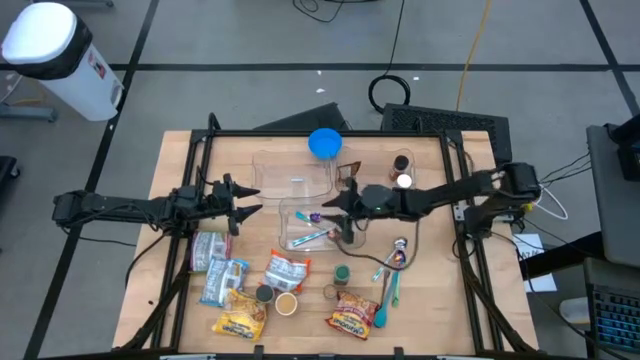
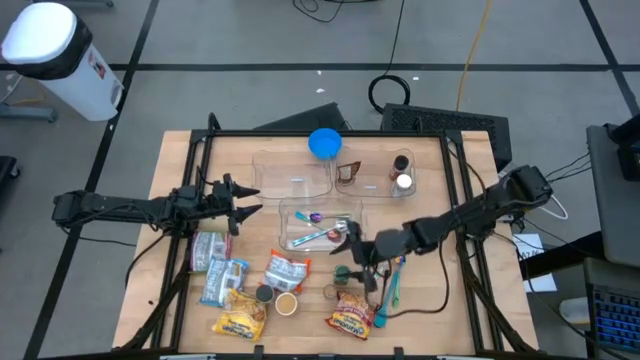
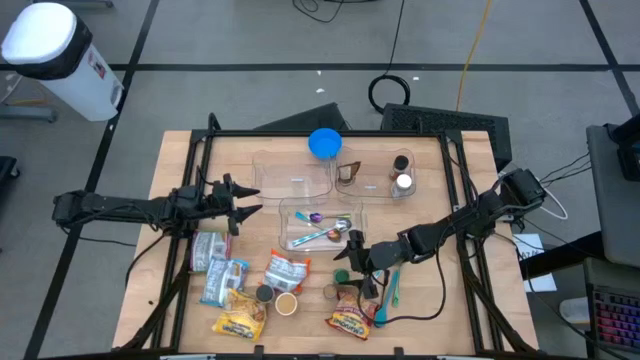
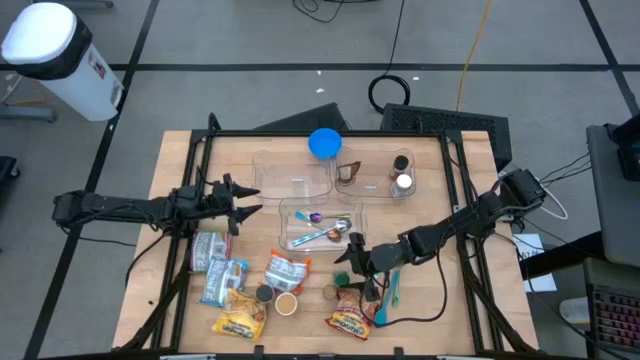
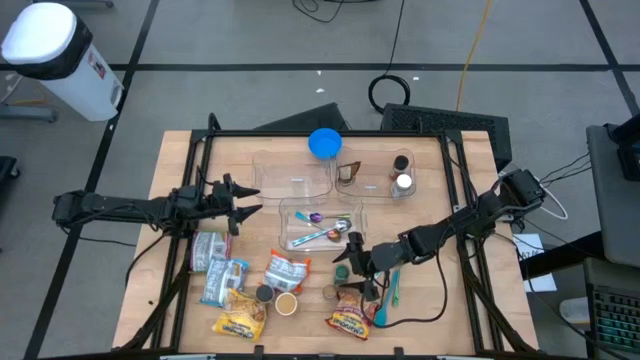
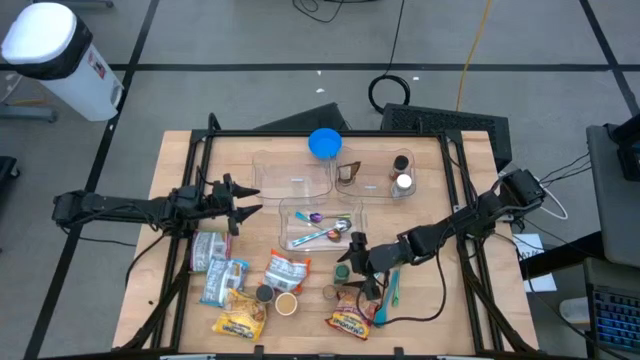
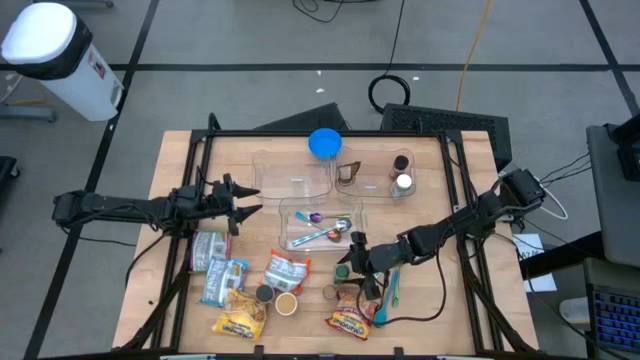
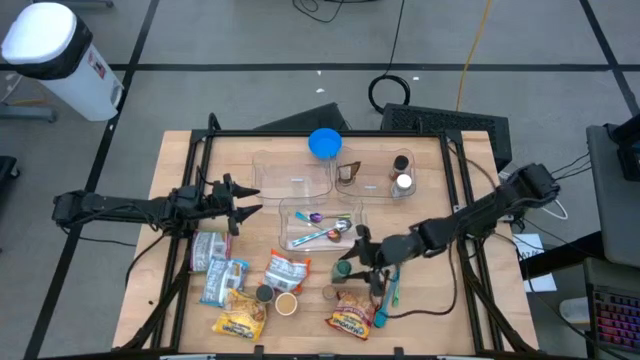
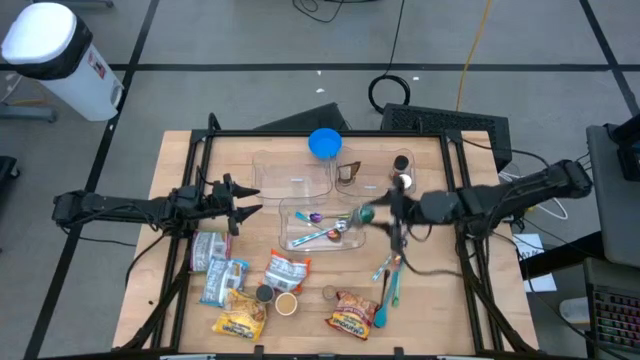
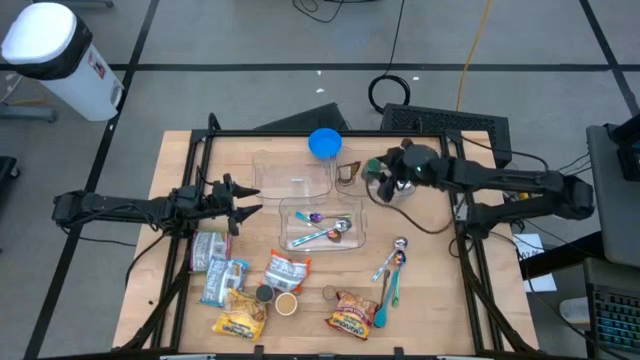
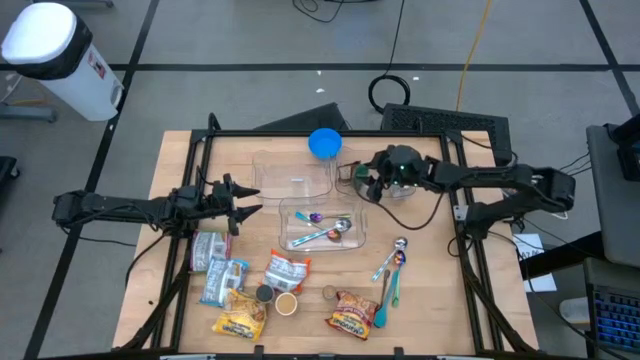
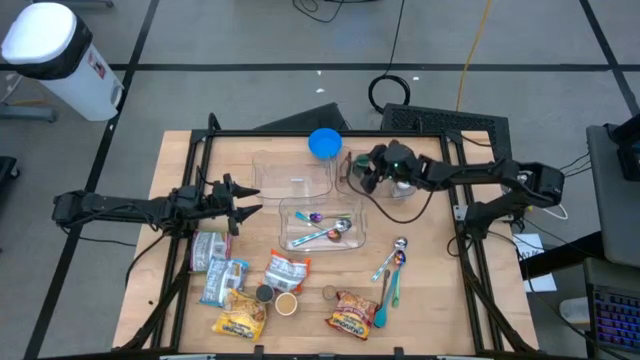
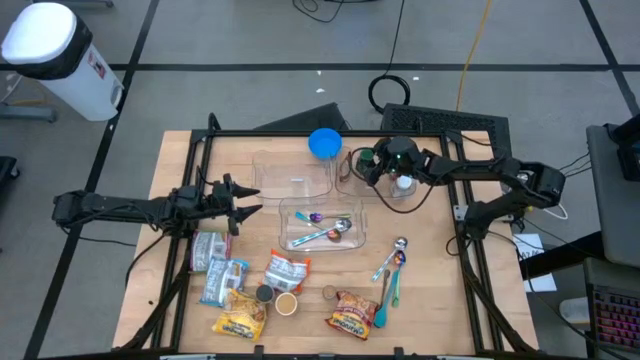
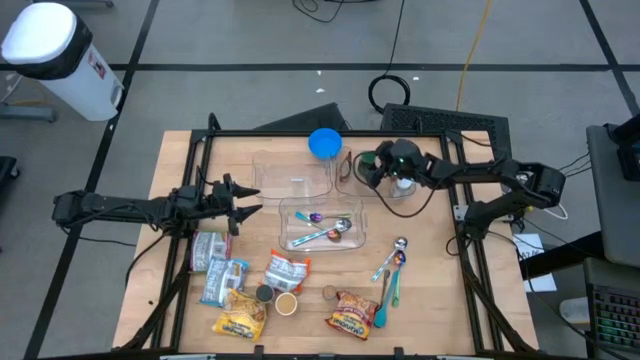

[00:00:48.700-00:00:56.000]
Task: Pick & Place Food Item
Put the green seasoning bottle into the top right transparent bin

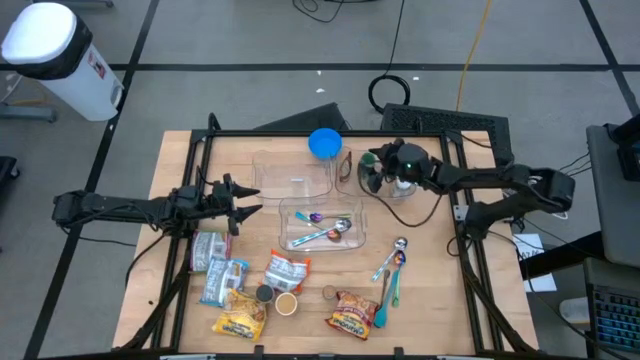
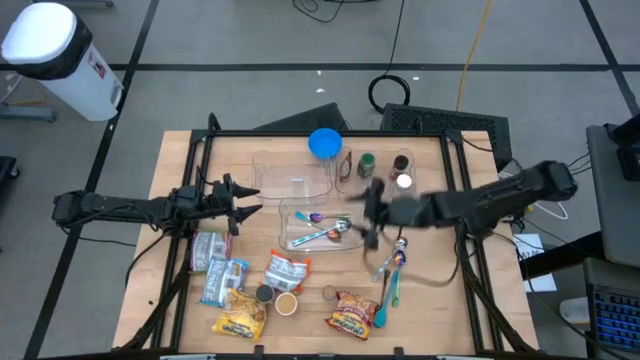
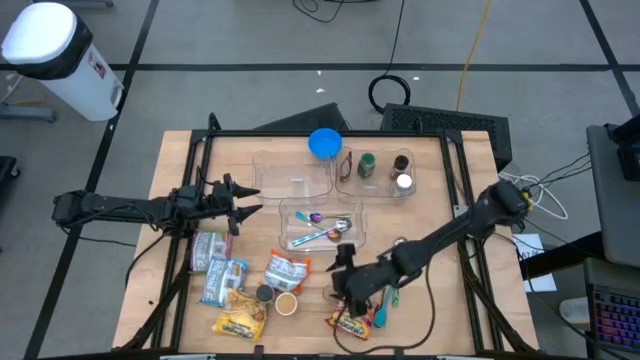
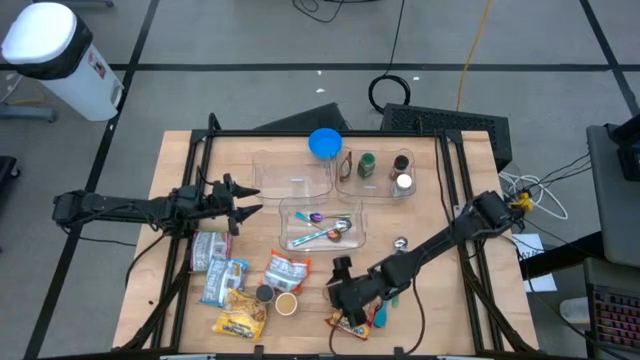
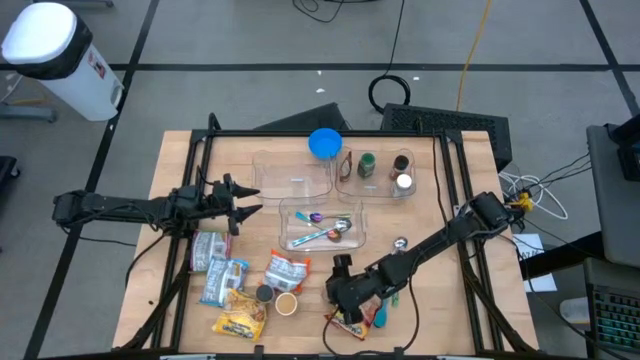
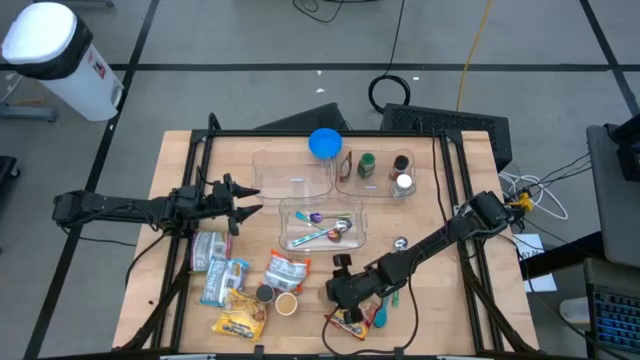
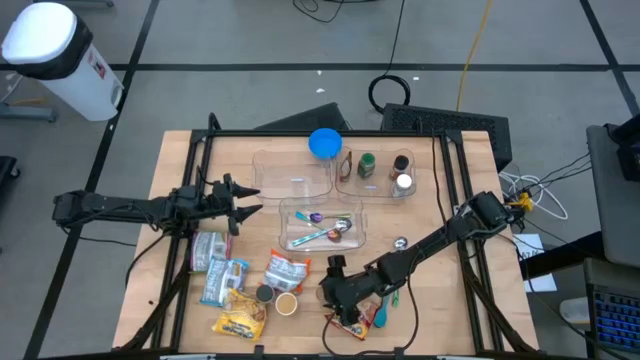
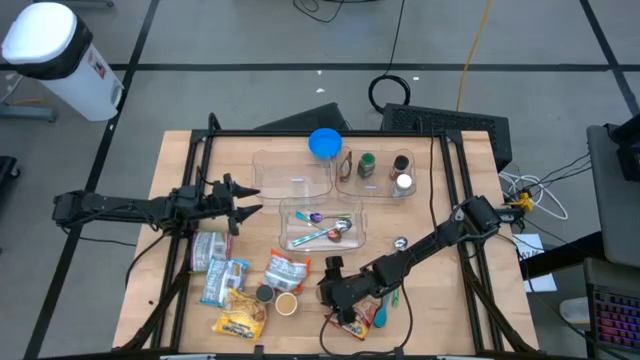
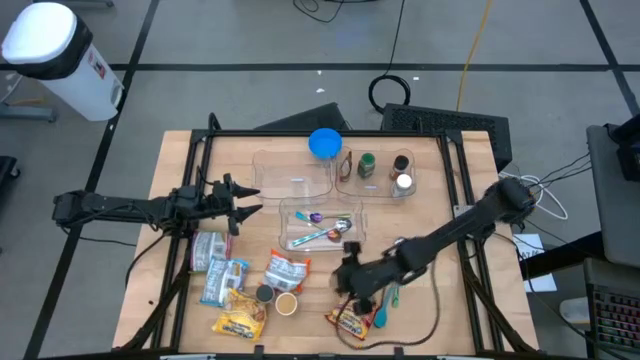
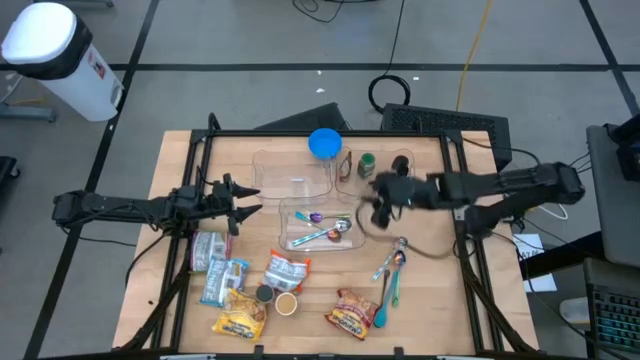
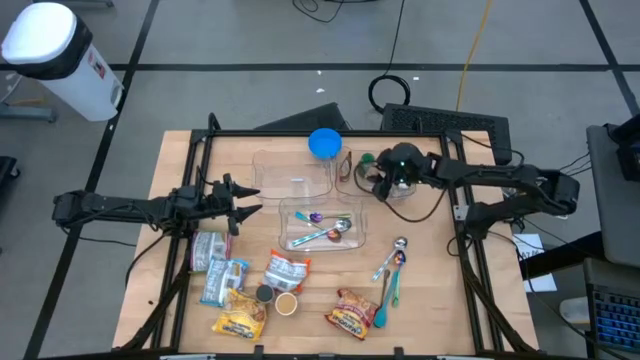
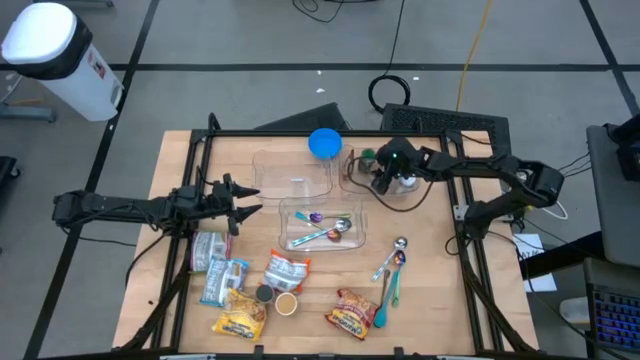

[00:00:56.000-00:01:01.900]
Put the brown seasoning bottle into the top right transparent bin

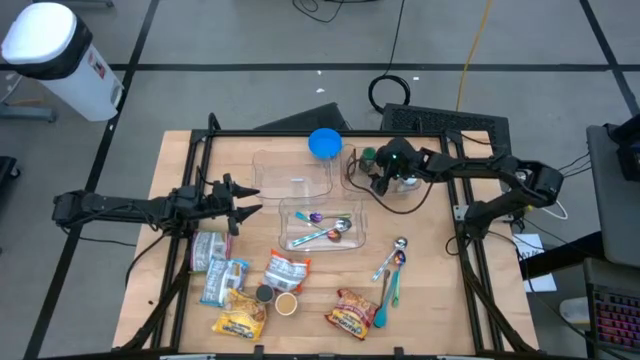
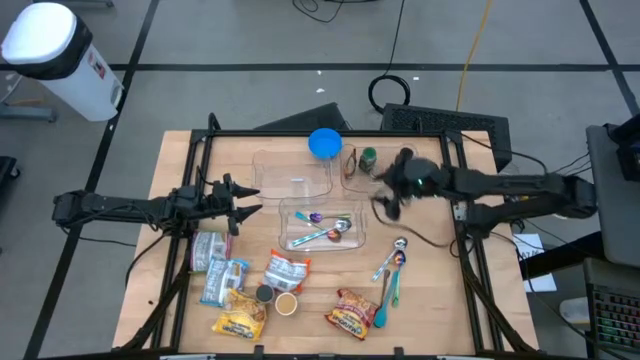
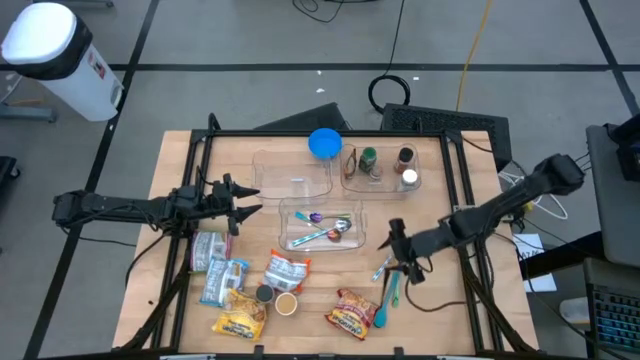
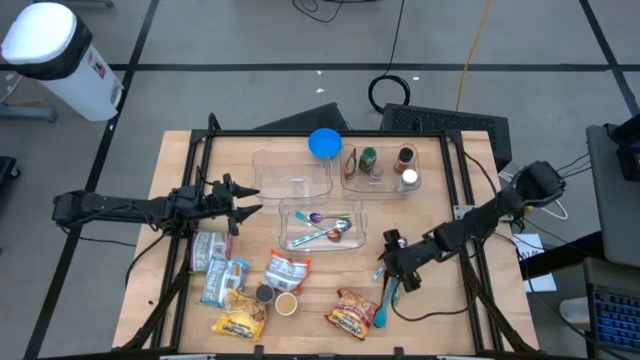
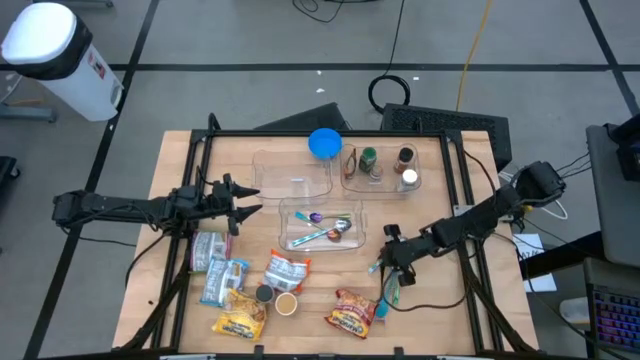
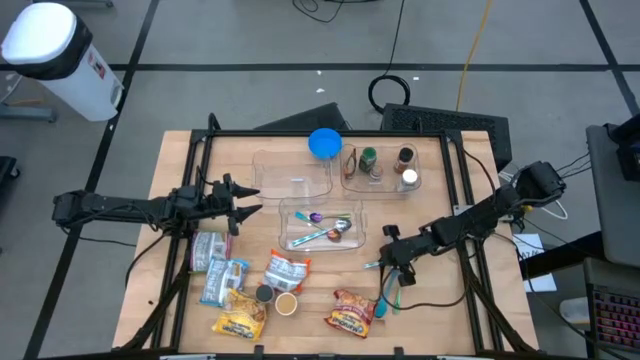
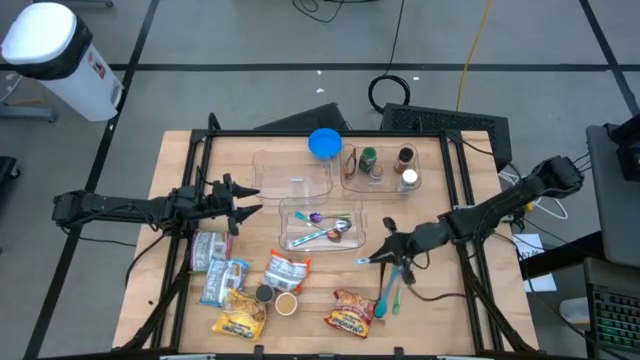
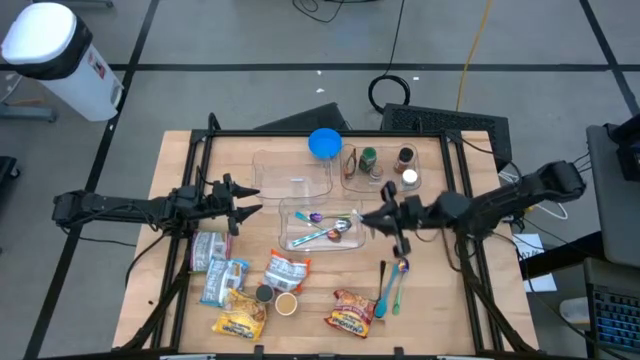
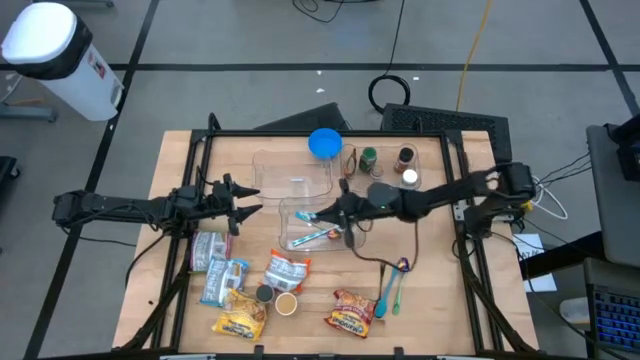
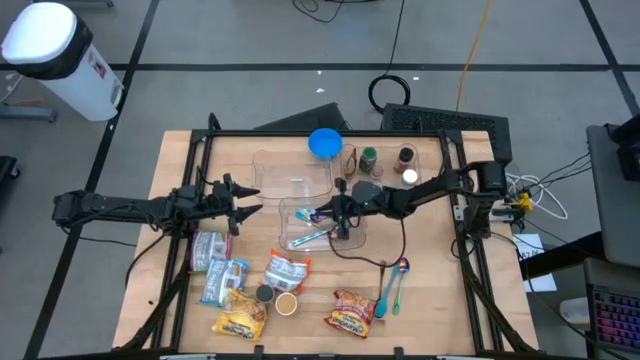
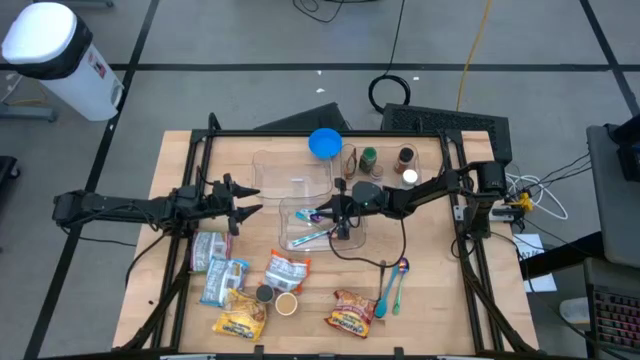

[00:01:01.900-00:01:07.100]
Put the blue patterned spoon into the bottom transparent bin

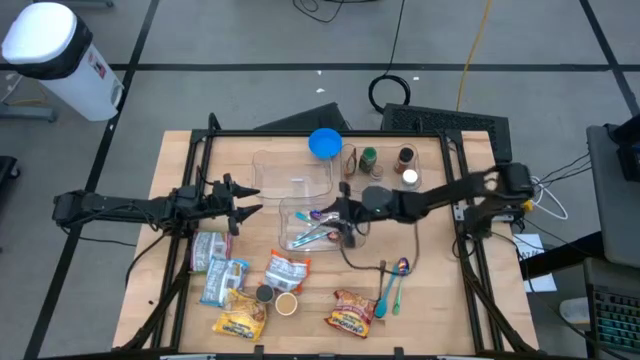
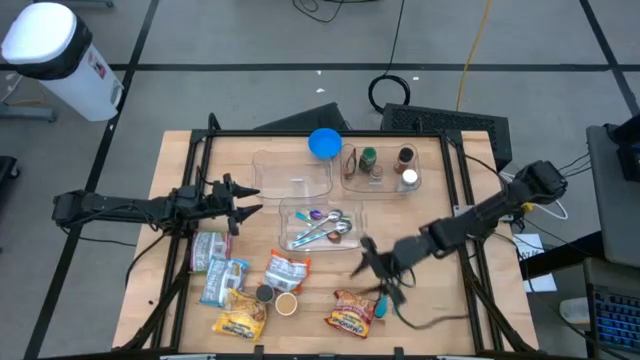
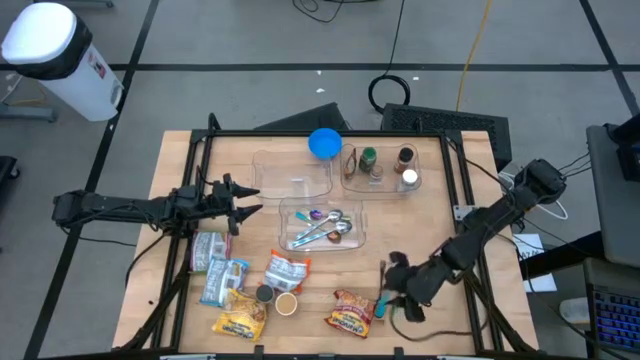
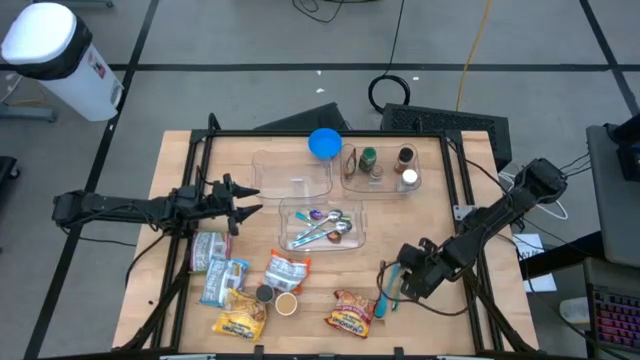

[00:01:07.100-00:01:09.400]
Put the green spoon into the bottom transparent bin
